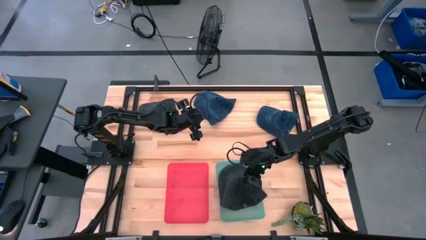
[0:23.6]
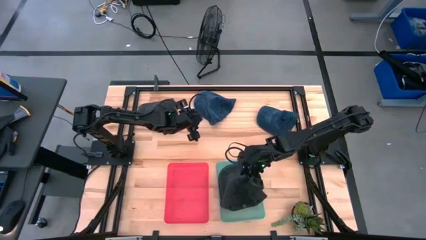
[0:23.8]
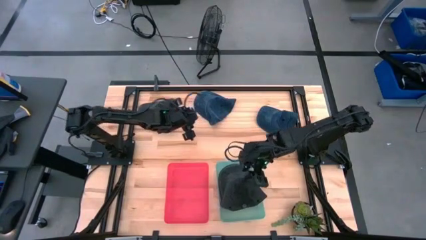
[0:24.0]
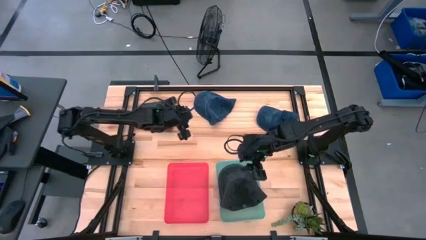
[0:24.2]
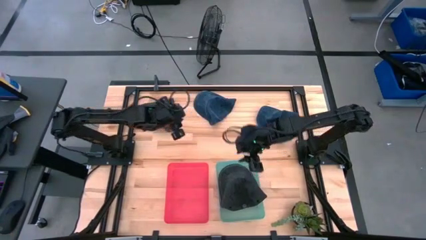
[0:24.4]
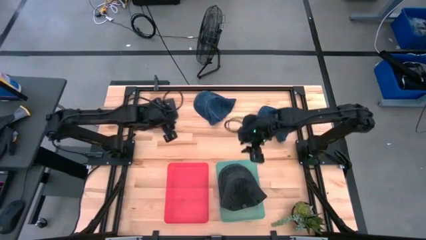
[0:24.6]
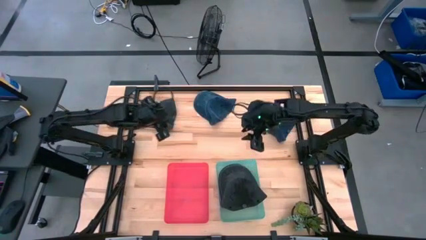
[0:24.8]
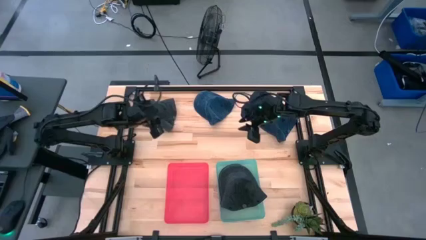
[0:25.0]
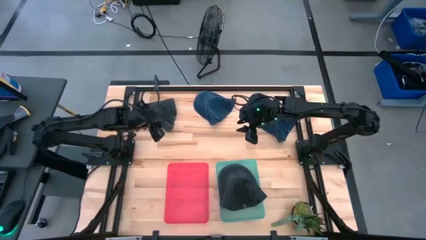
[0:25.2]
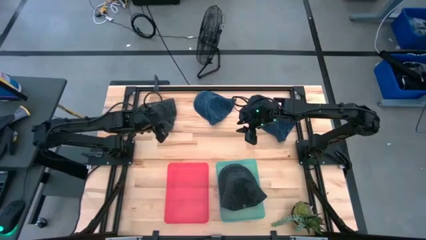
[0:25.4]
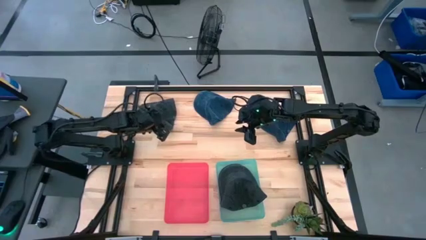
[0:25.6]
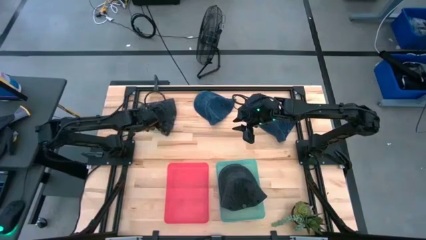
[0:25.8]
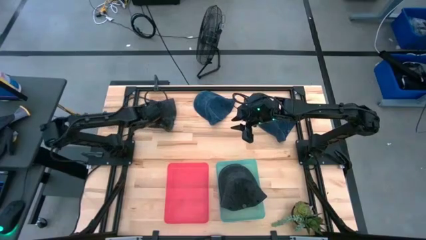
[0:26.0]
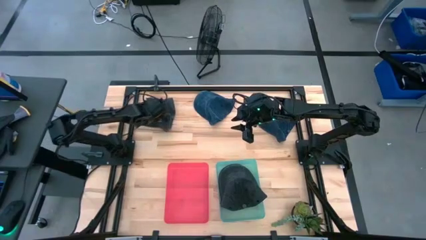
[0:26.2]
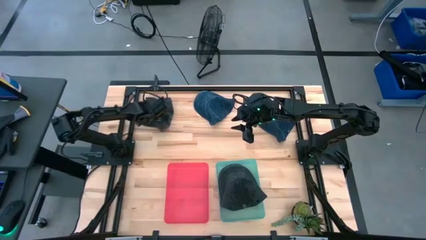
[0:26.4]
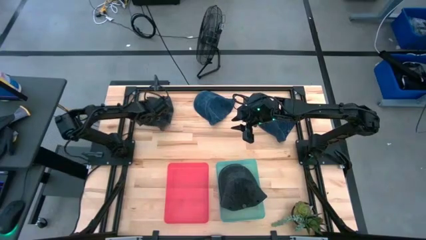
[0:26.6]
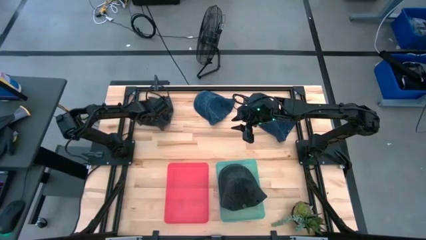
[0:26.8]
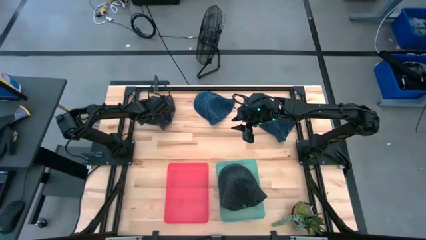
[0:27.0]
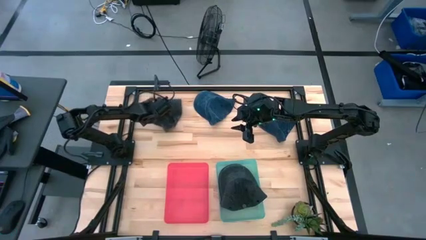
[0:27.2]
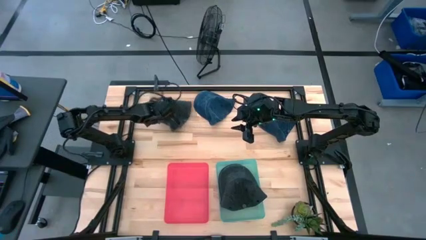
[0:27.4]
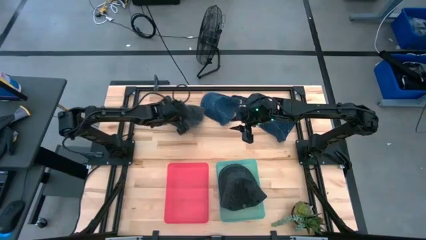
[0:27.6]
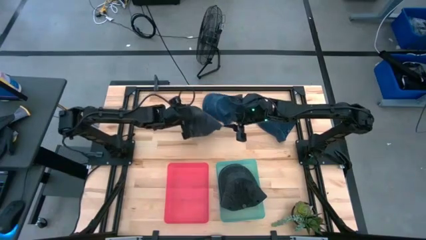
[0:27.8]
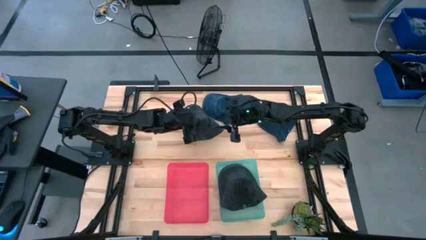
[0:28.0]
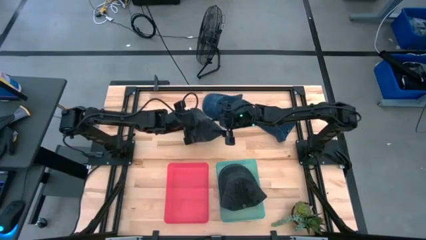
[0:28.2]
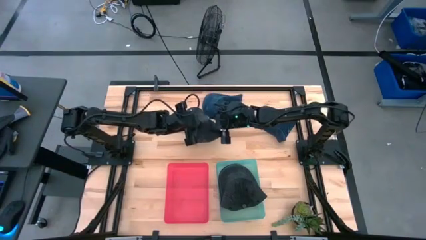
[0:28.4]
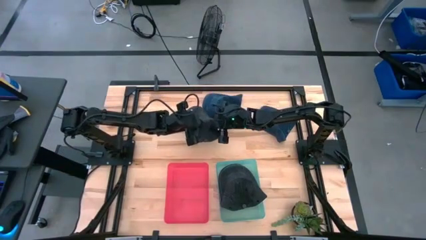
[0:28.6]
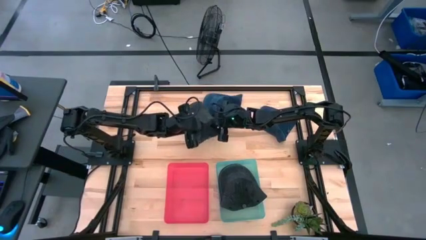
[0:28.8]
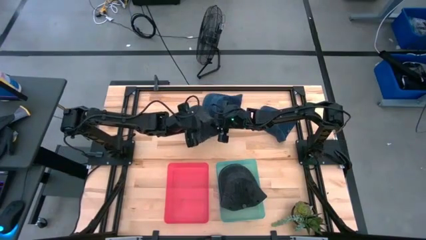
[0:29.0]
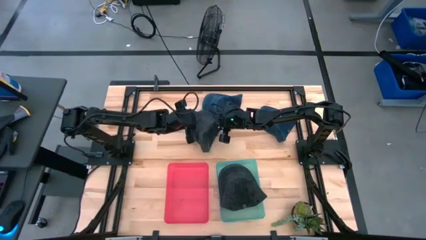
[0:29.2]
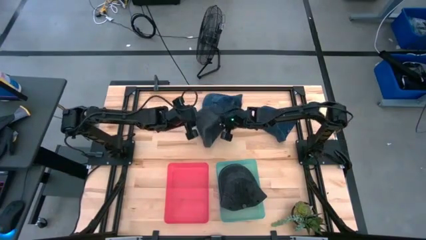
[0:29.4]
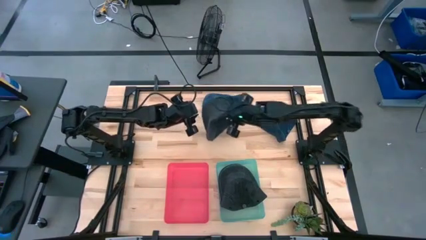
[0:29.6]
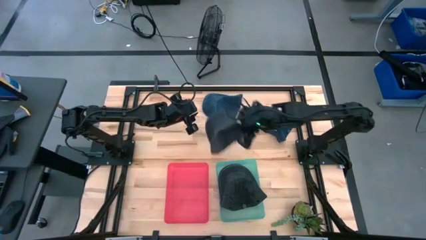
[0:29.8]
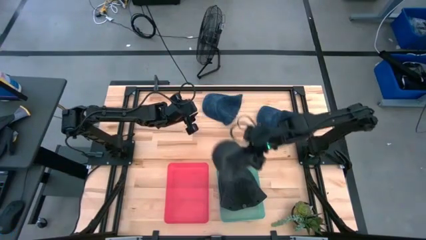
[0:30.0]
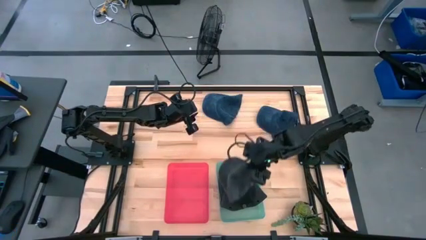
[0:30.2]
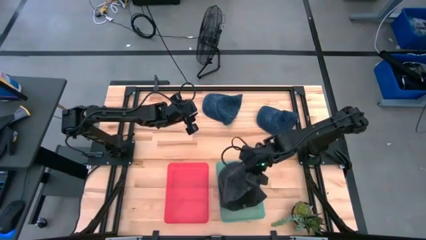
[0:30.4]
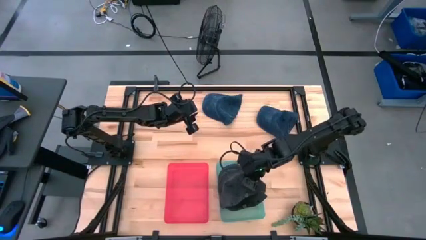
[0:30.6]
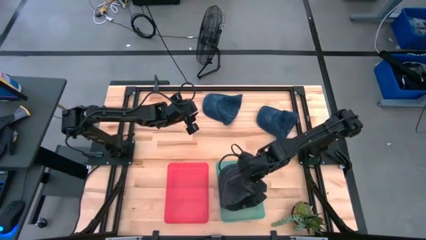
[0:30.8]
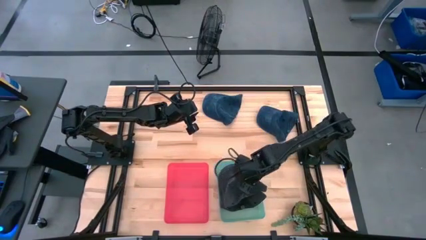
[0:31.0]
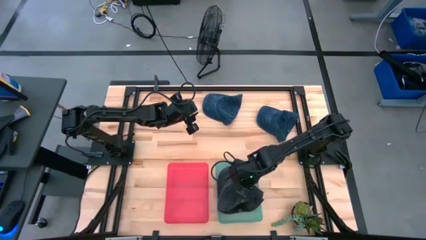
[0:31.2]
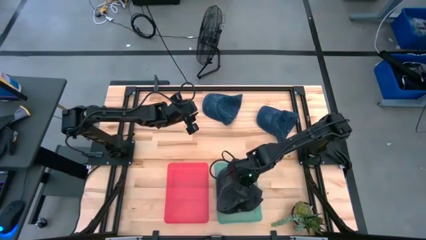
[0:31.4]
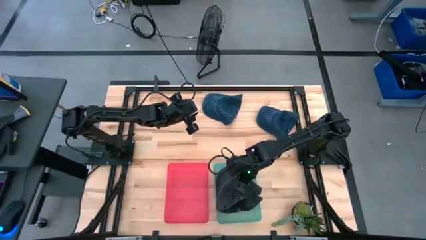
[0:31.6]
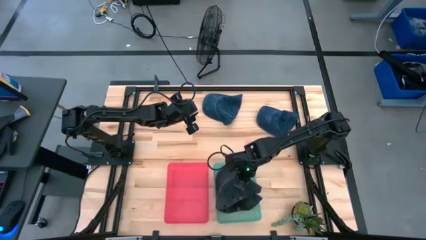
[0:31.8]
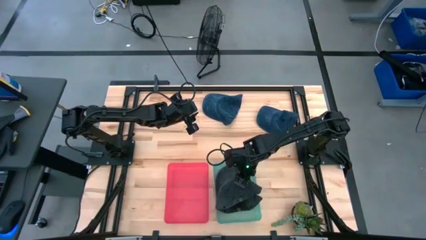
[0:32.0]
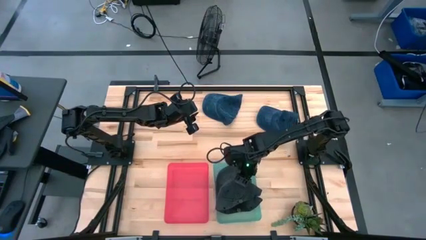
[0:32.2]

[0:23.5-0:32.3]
Task: Pick & Place hat
Put the black cap into the green bin

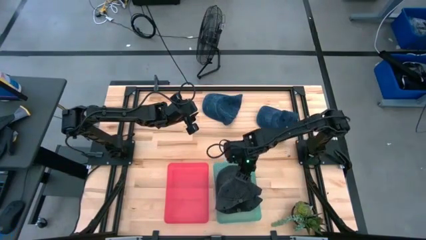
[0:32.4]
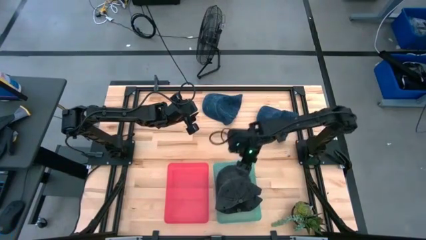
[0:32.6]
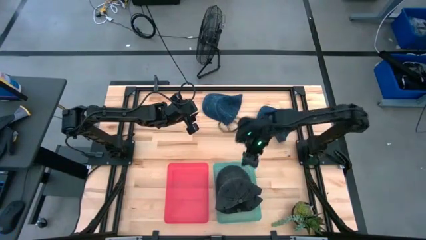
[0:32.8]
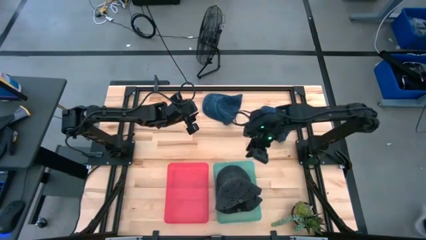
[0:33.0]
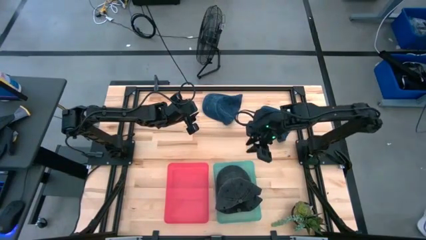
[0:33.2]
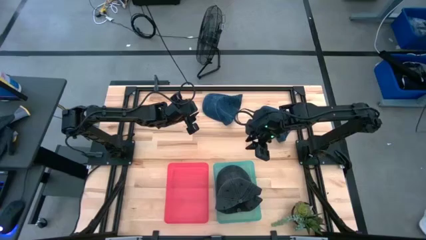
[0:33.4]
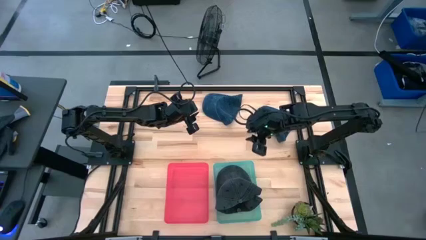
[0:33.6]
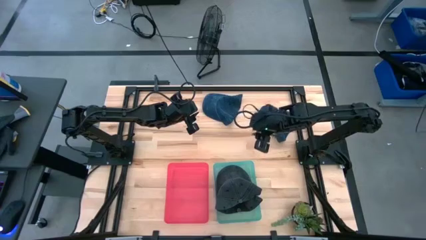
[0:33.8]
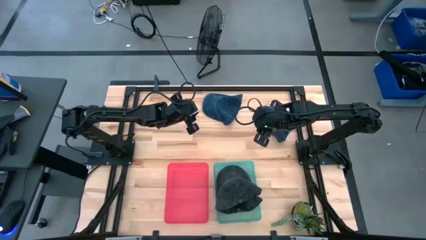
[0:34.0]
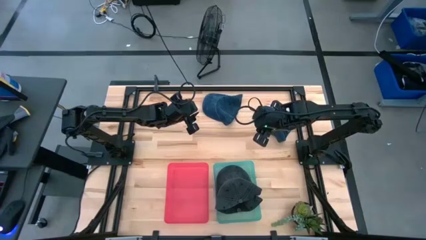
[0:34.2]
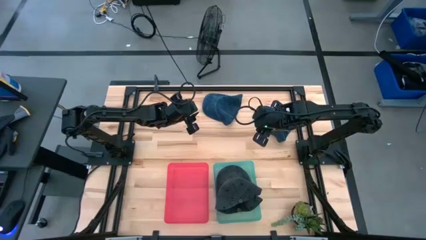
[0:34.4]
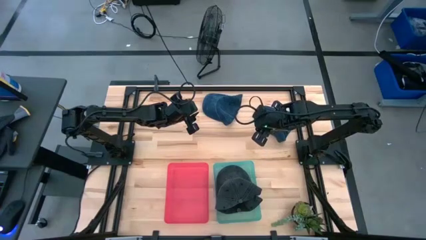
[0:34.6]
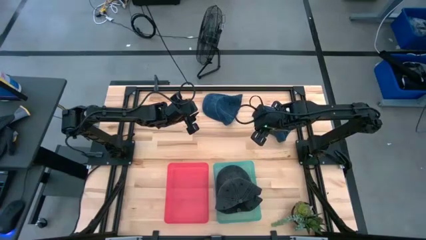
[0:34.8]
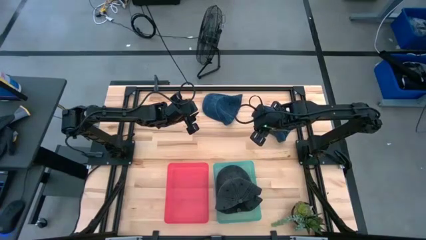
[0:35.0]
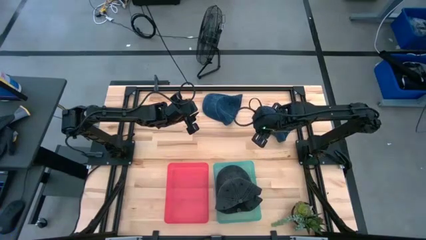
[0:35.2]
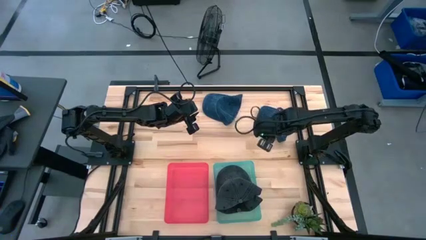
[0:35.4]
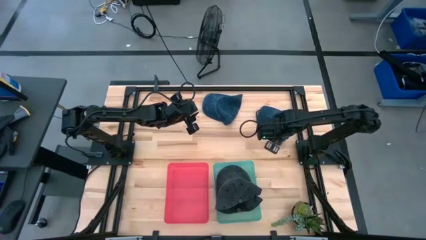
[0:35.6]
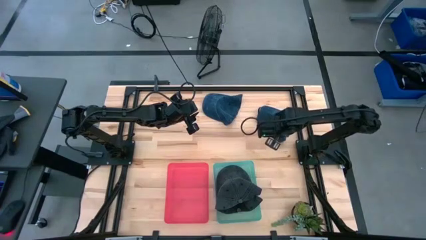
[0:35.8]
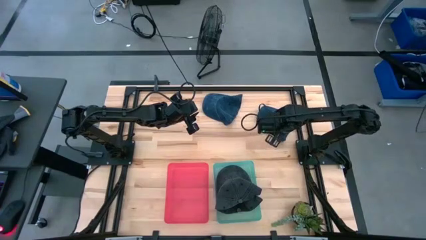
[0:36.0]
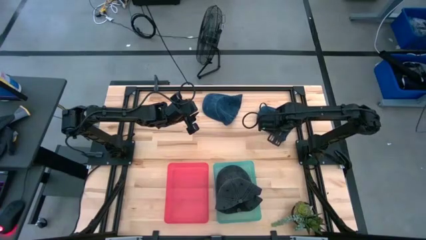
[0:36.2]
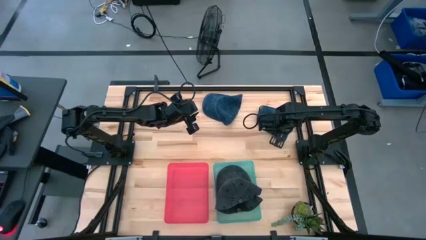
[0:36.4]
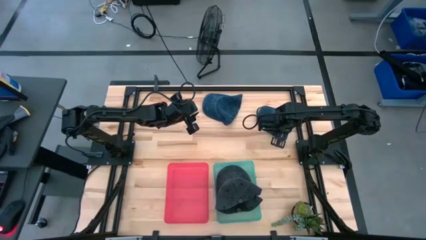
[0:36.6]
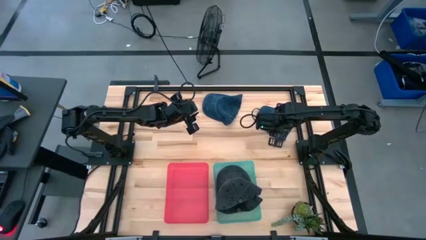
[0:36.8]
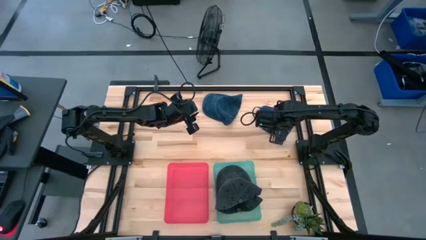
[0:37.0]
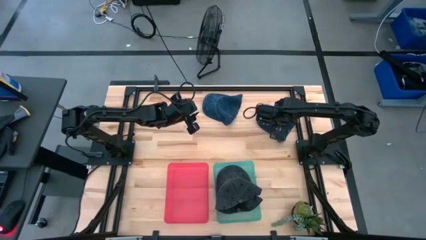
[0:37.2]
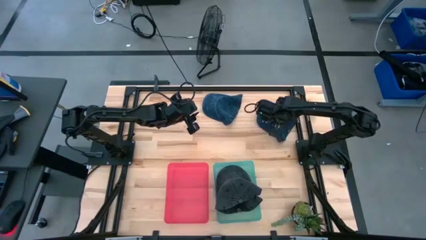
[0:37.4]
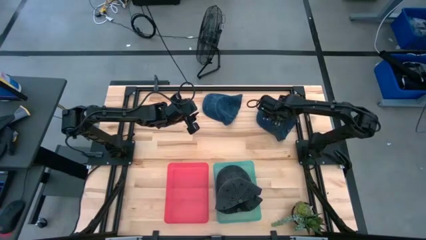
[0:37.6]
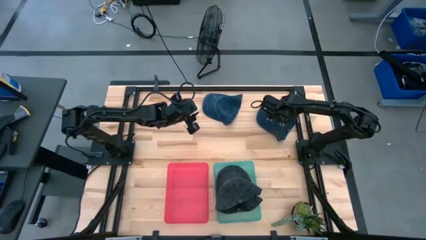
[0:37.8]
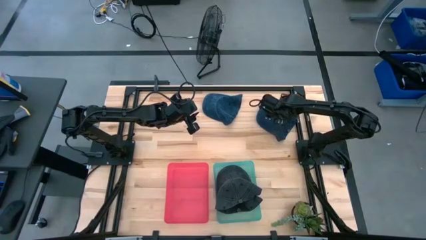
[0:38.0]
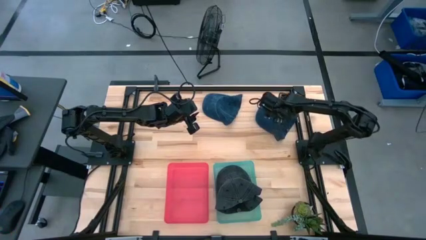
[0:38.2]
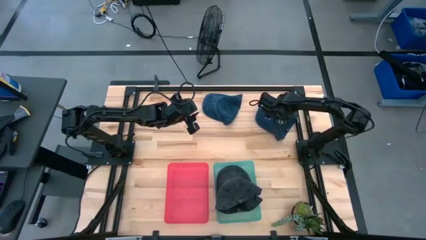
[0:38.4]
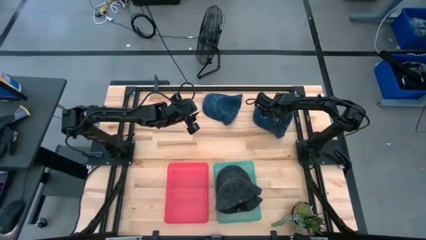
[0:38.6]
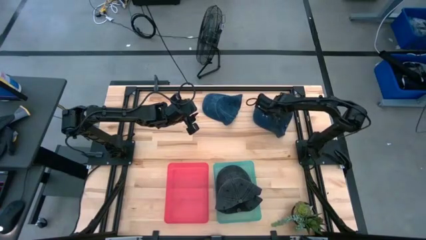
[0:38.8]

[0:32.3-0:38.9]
Put the right blue cap into the pink bin
